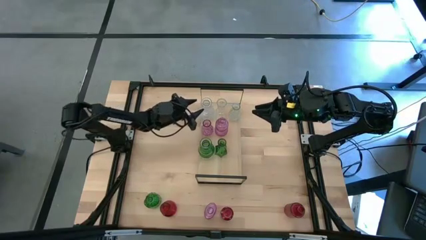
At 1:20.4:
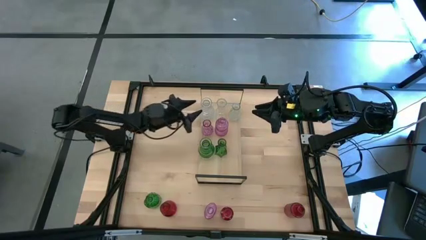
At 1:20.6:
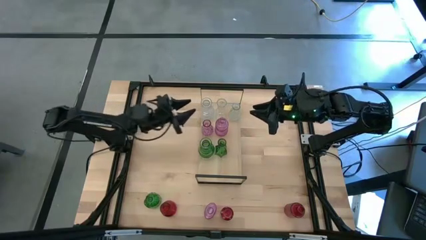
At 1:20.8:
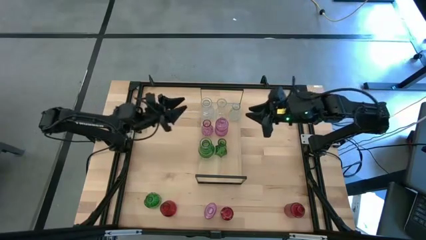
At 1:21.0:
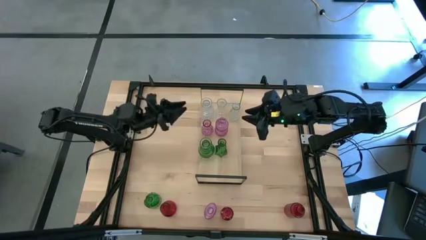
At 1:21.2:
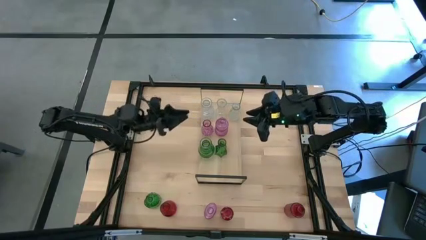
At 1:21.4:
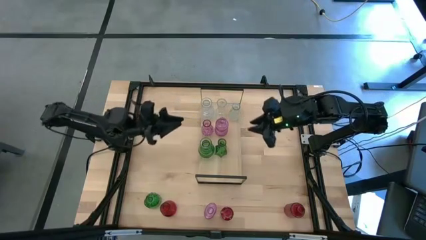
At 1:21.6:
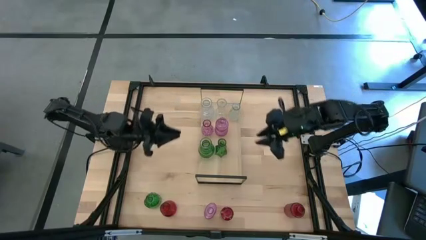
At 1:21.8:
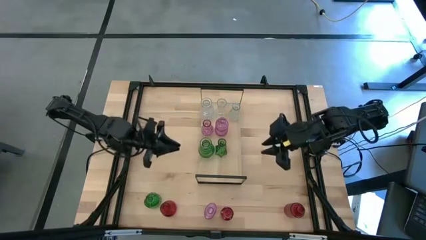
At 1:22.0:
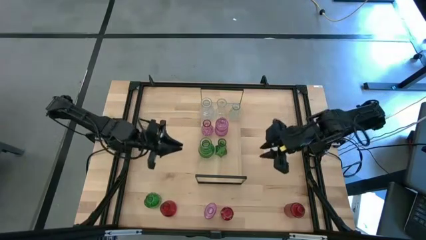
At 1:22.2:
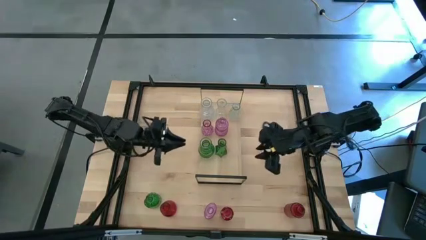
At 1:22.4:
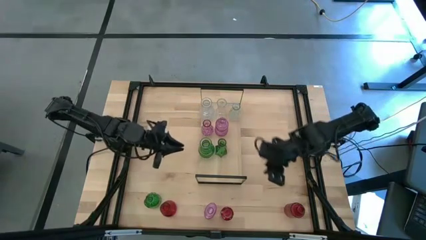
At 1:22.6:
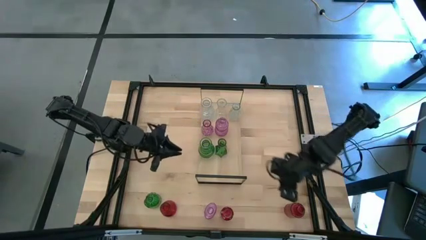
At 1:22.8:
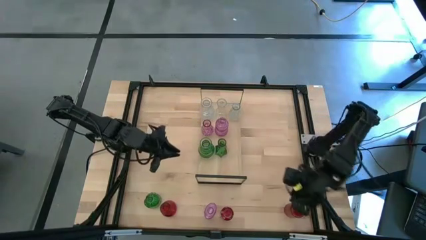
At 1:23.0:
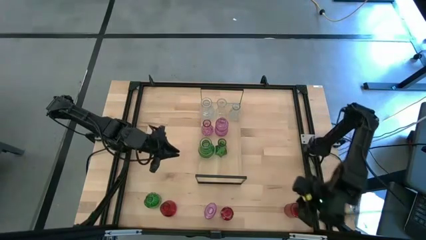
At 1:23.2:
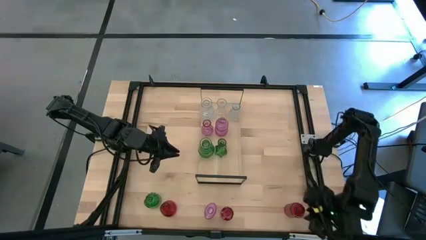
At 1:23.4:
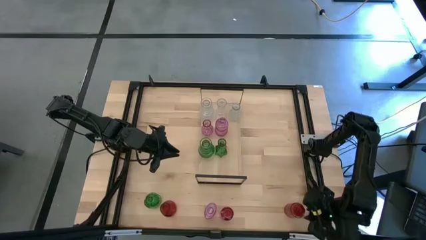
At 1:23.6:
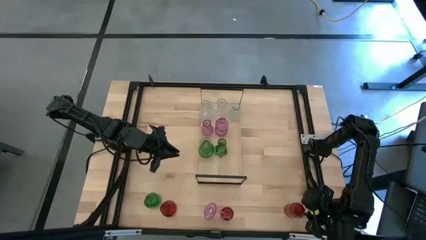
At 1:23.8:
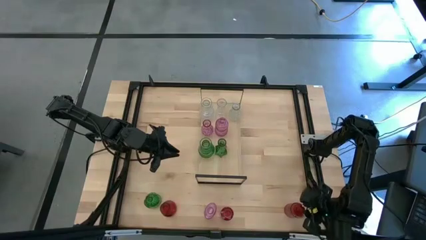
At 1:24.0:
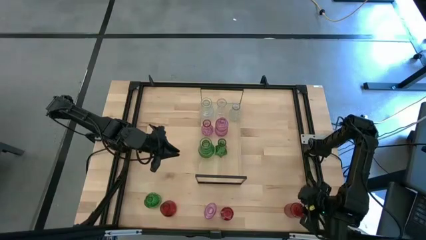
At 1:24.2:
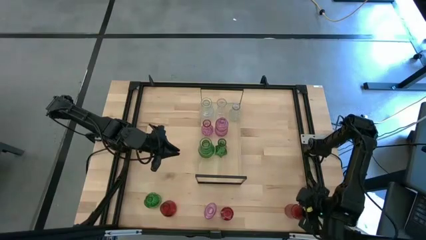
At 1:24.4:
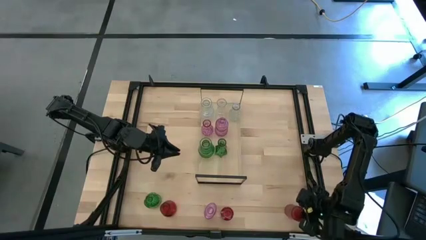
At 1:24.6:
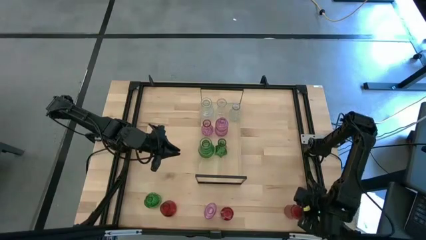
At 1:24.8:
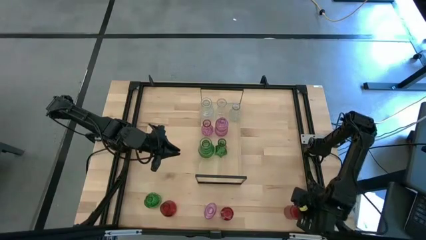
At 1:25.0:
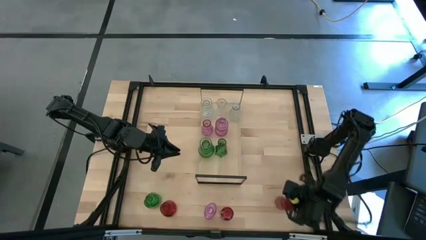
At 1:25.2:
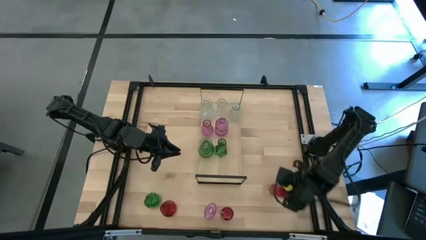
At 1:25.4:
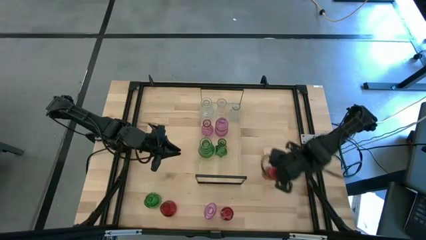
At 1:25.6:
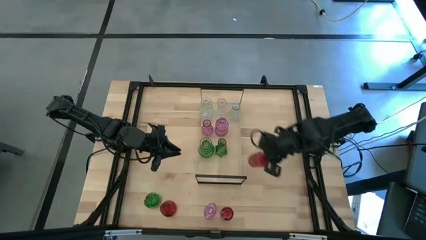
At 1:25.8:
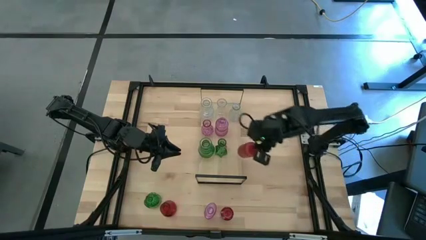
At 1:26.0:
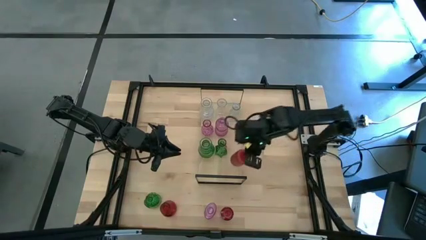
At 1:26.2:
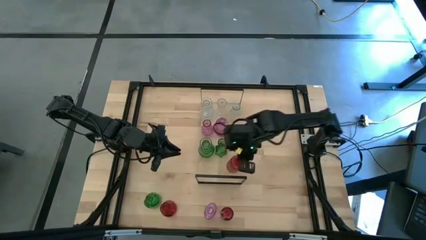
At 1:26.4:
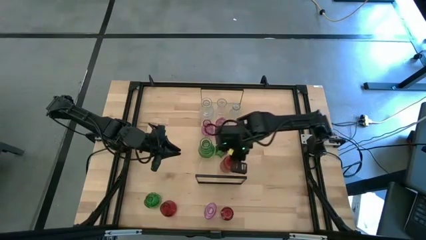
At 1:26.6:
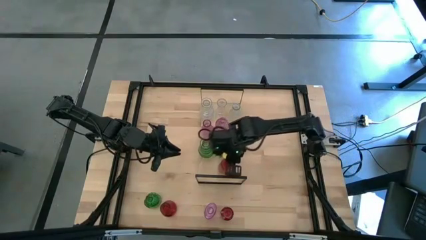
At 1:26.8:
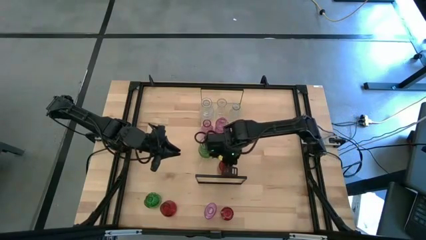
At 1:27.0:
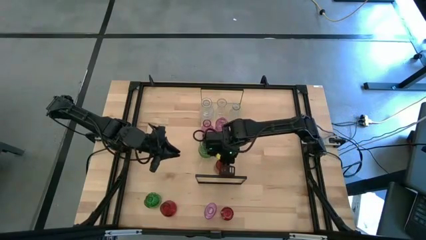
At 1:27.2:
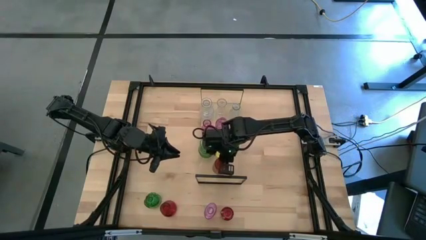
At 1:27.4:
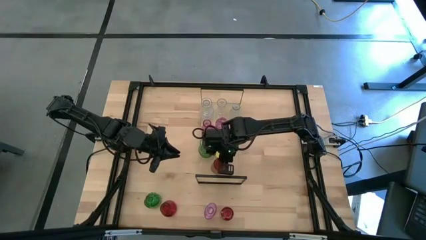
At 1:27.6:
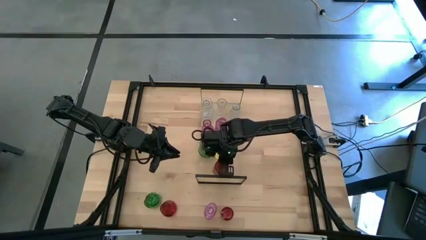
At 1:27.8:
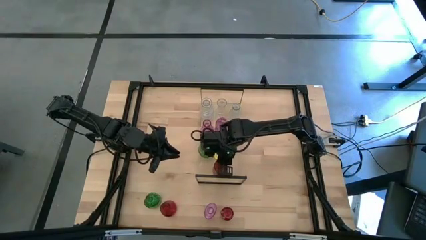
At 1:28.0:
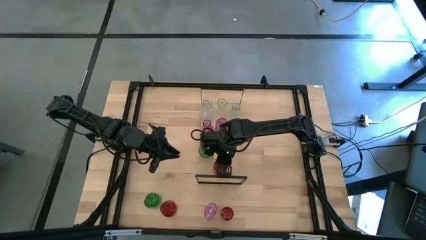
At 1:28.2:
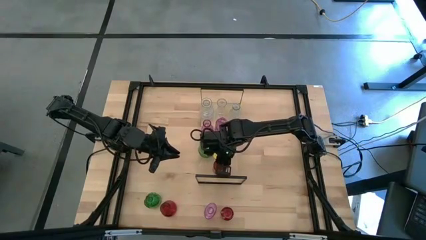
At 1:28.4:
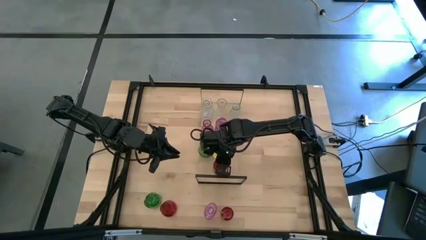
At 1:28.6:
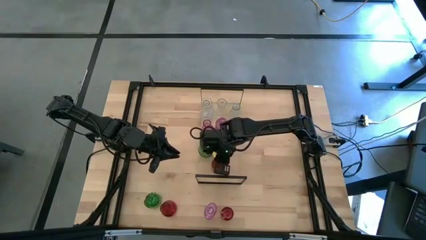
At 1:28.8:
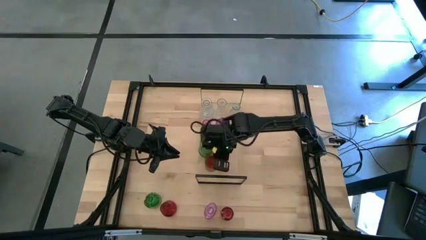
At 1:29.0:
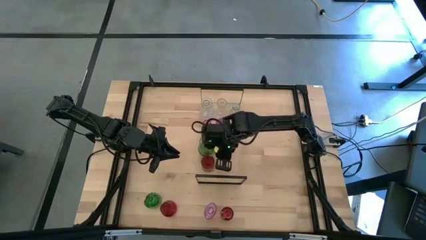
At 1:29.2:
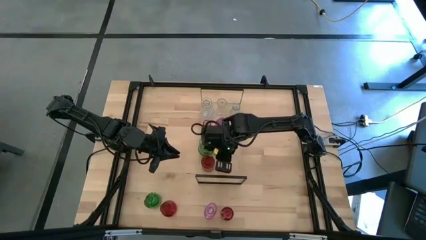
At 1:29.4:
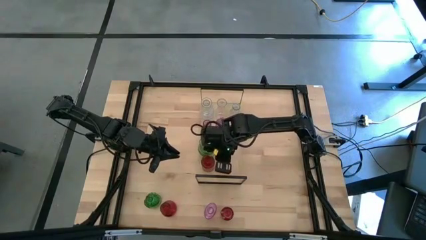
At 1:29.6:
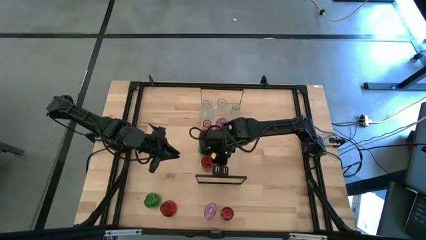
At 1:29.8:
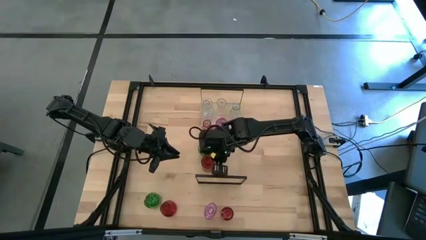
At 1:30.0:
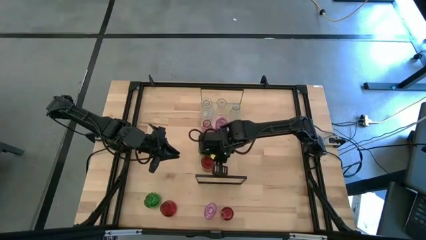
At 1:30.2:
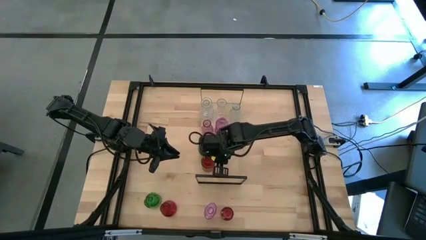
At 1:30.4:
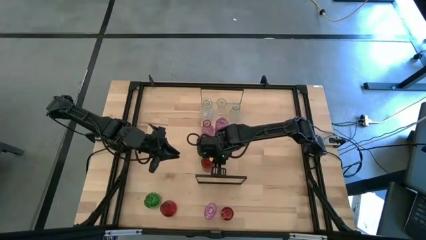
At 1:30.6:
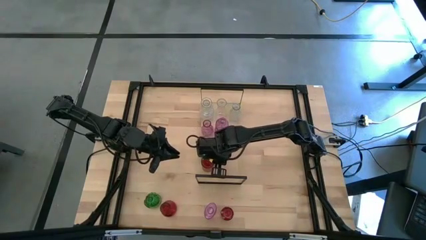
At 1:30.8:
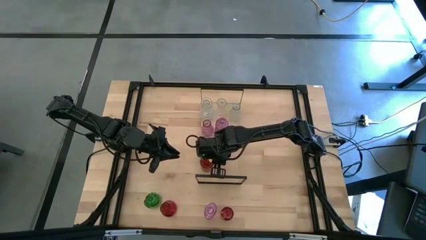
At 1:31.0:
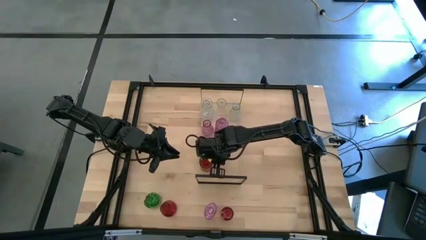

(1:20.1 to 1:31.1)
Task: sort vases onto shelf
Put the right red vase on the shelf

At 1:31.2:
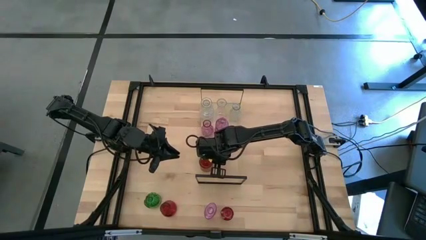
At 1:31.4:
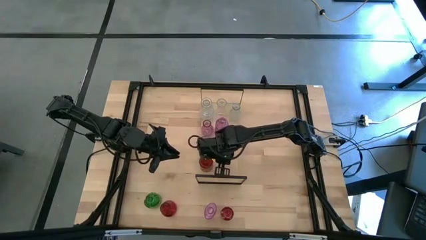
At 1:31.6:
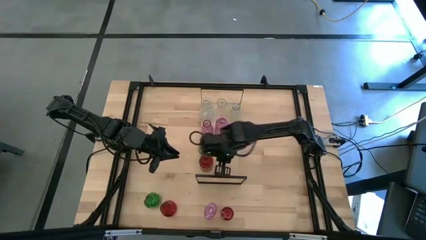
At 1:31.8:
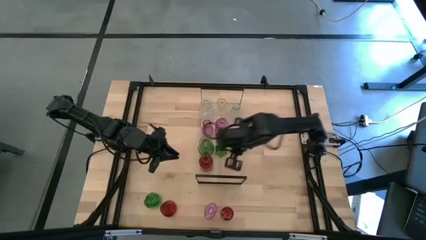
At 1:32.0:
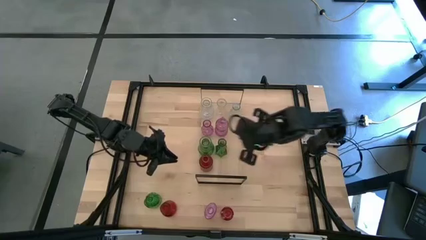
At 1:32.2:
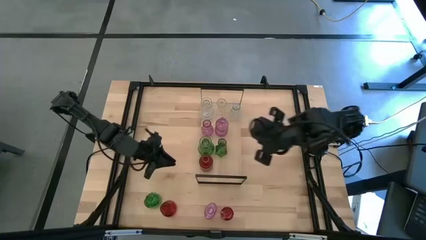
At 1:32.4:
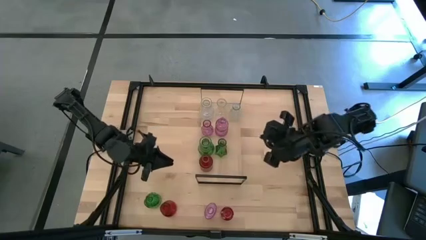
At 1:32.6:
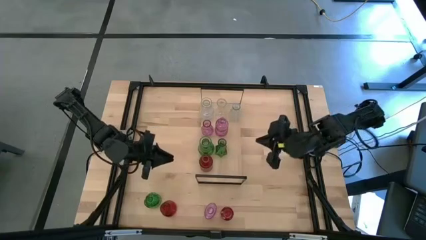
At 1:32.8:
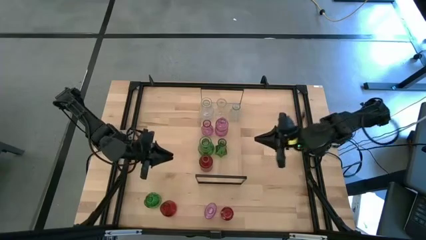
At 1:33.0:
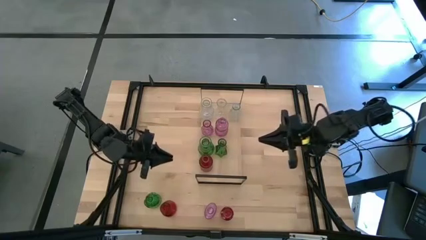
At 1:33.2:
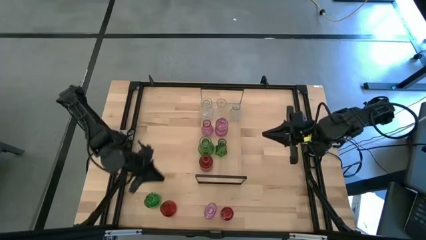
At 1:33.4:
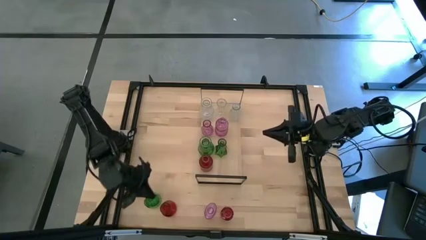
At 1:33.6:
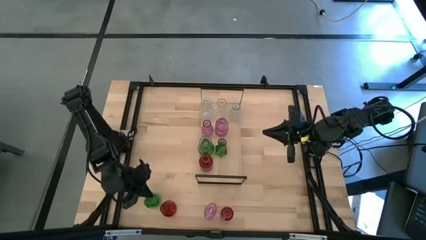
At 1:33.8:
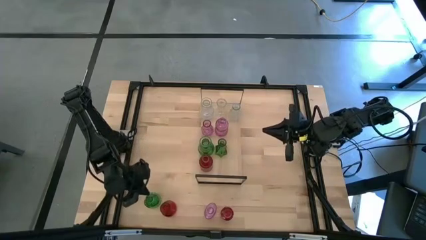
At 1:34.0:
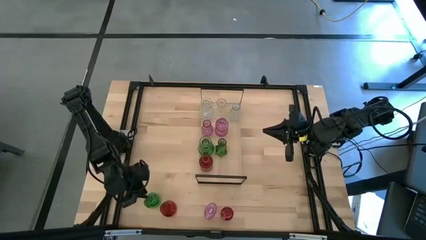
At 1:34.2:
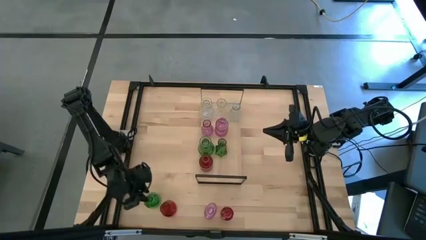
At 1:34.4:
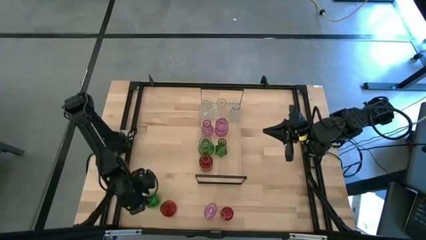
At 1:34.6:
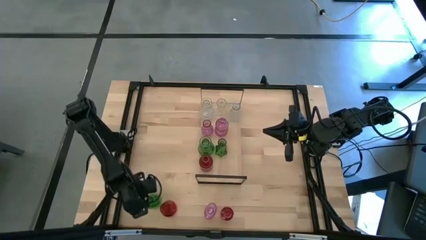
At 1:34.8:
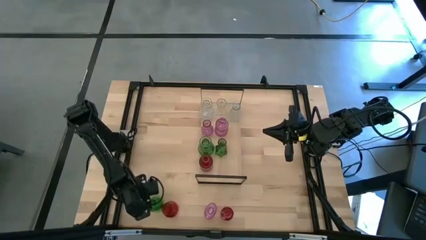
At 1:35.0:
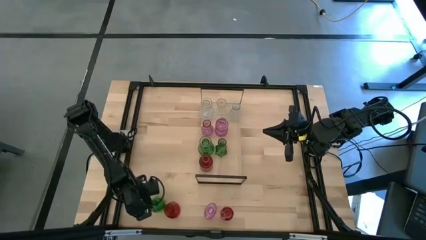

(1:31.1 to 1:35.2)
Put the green vase on the shelf aligned with the other green vases
